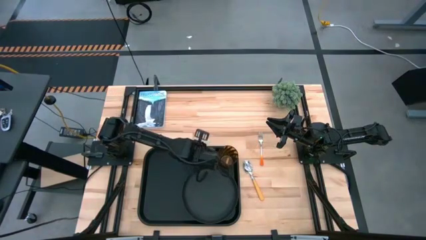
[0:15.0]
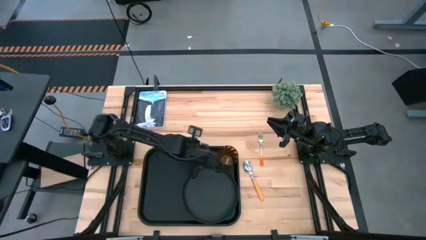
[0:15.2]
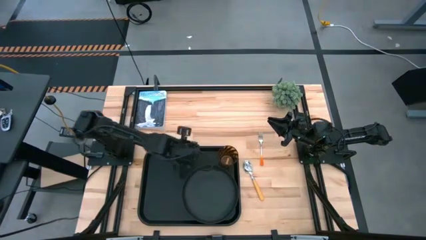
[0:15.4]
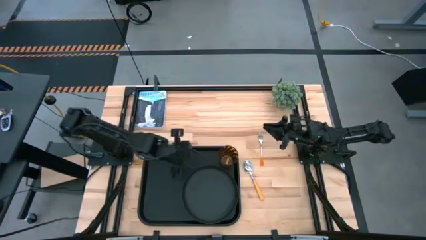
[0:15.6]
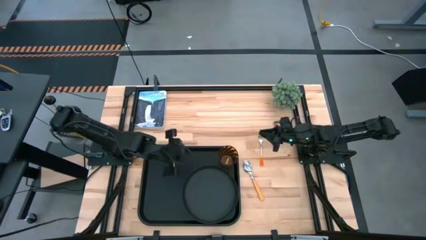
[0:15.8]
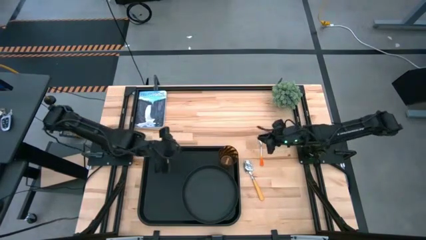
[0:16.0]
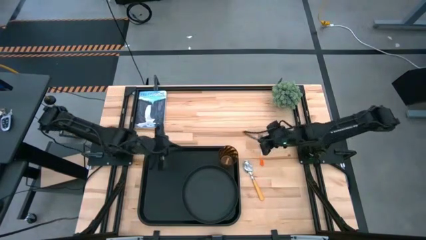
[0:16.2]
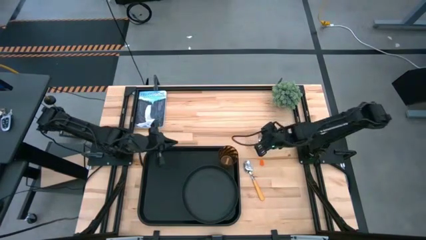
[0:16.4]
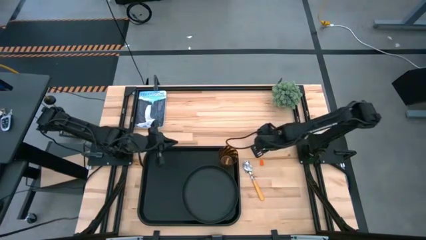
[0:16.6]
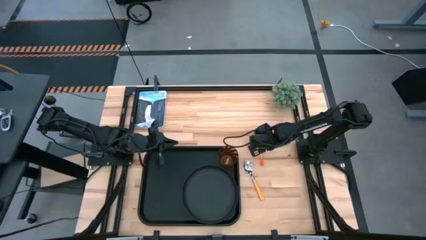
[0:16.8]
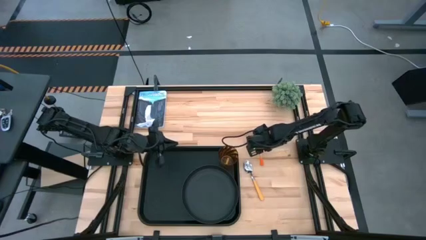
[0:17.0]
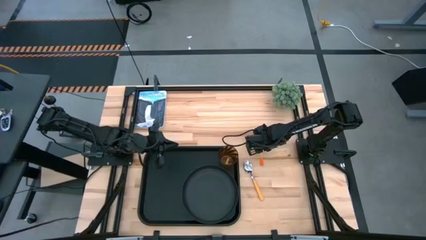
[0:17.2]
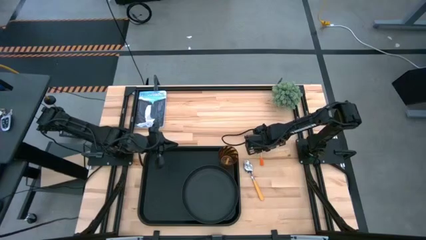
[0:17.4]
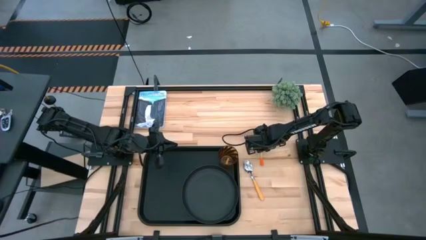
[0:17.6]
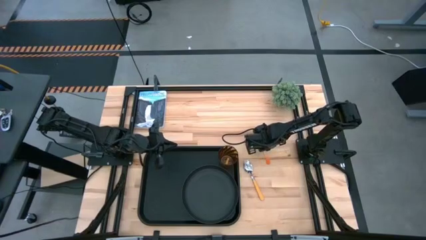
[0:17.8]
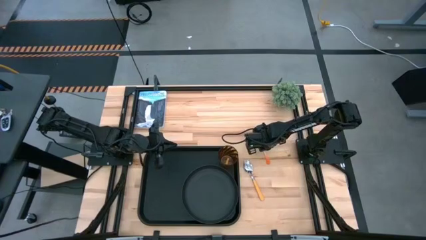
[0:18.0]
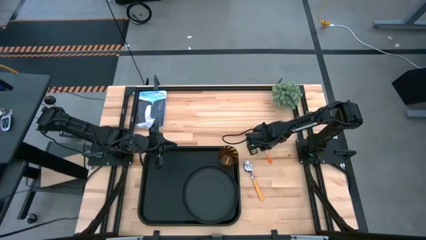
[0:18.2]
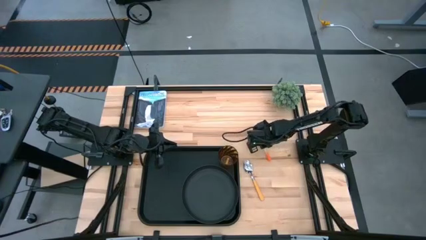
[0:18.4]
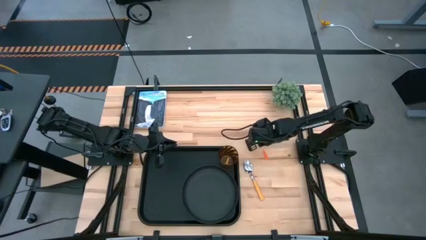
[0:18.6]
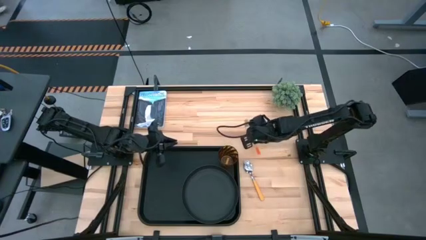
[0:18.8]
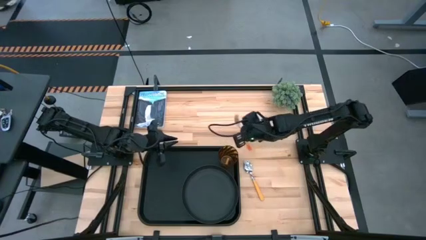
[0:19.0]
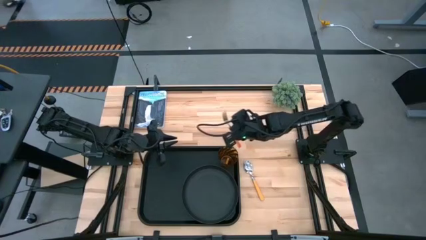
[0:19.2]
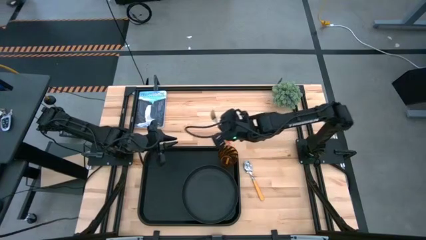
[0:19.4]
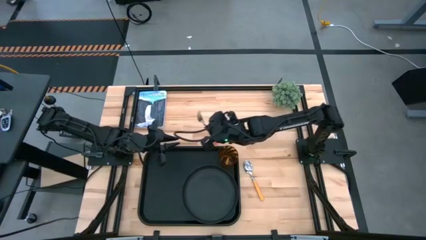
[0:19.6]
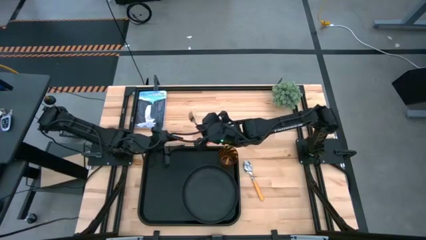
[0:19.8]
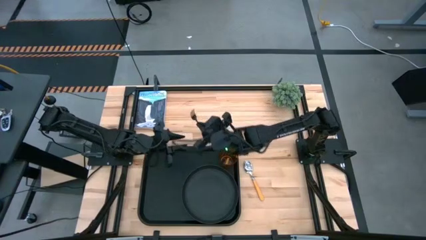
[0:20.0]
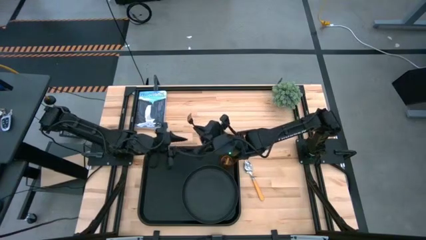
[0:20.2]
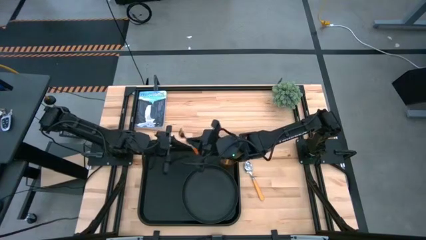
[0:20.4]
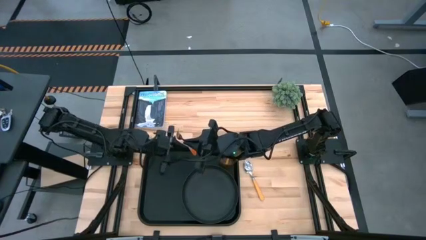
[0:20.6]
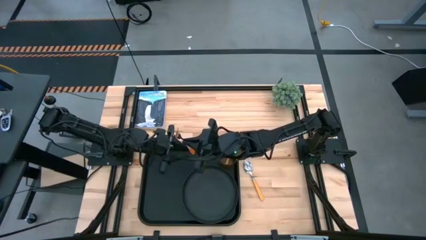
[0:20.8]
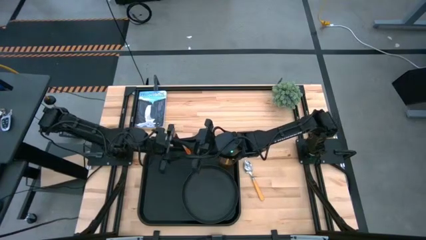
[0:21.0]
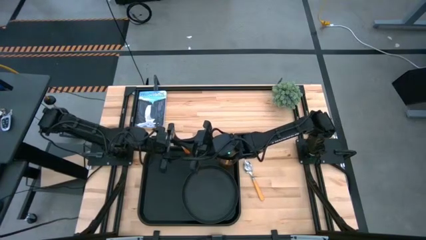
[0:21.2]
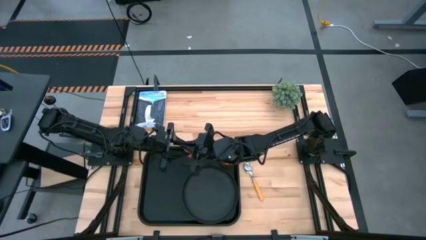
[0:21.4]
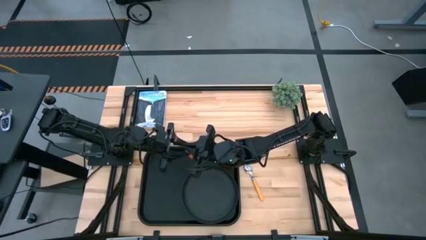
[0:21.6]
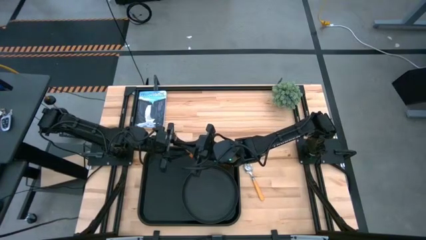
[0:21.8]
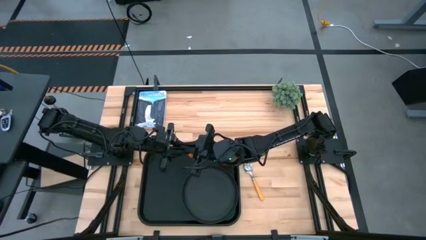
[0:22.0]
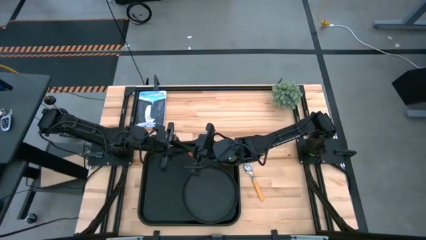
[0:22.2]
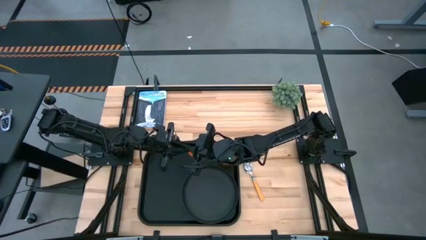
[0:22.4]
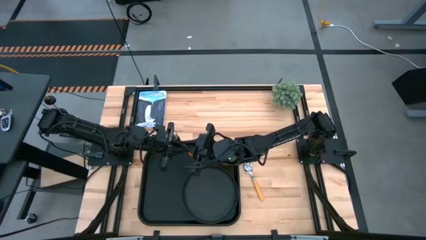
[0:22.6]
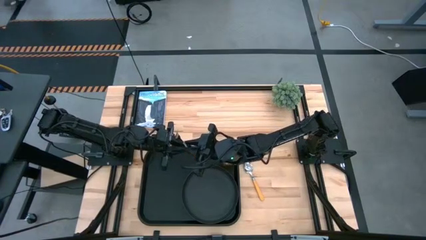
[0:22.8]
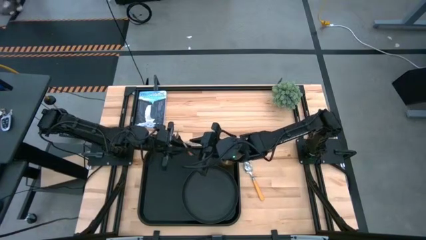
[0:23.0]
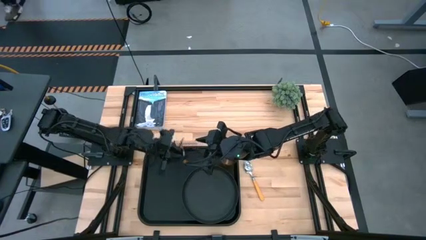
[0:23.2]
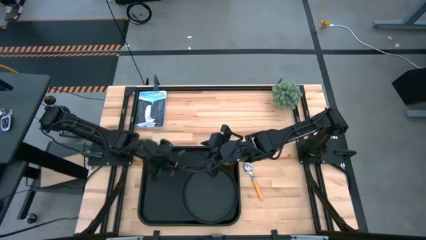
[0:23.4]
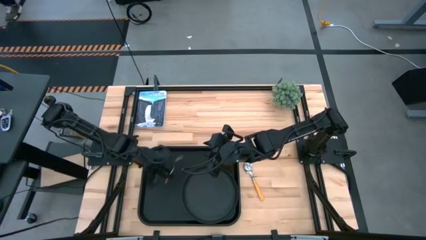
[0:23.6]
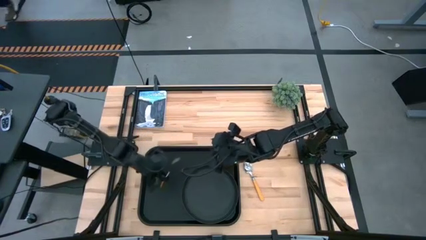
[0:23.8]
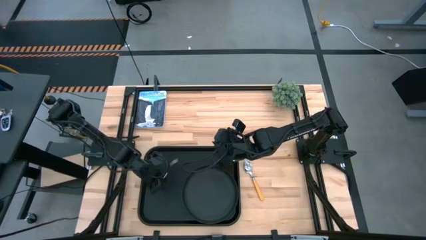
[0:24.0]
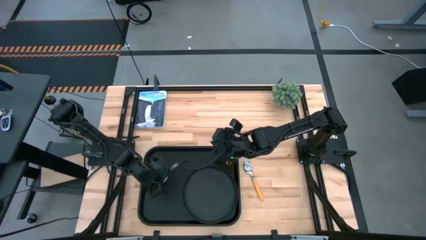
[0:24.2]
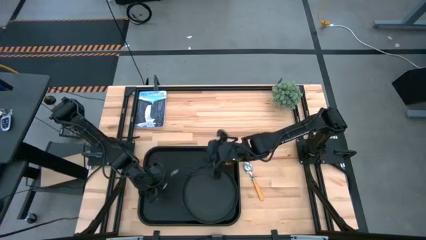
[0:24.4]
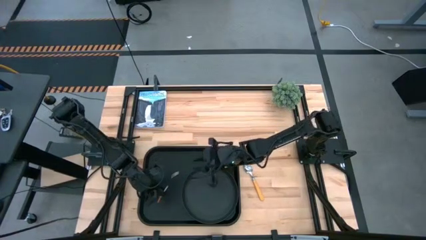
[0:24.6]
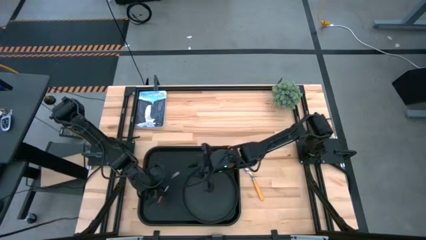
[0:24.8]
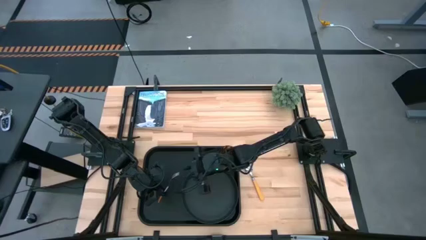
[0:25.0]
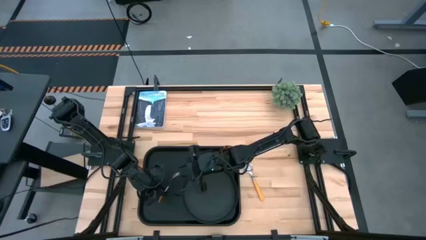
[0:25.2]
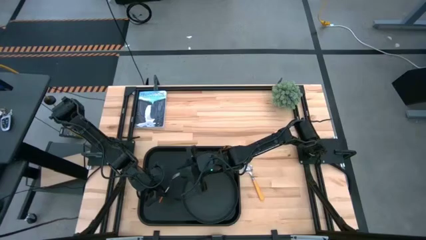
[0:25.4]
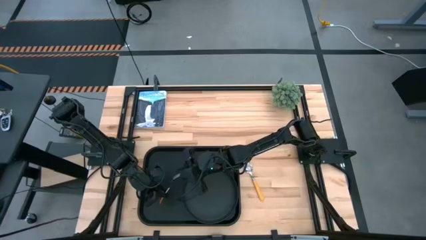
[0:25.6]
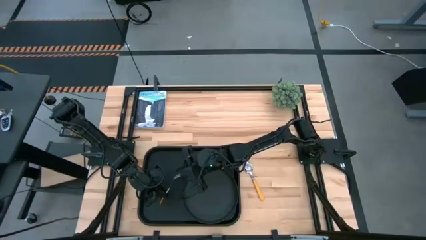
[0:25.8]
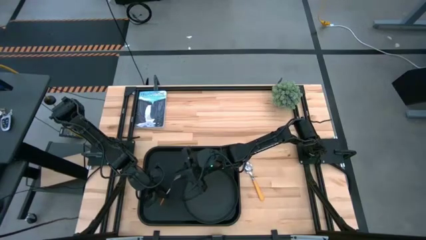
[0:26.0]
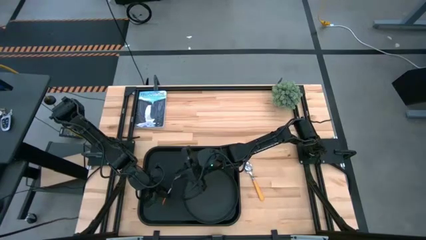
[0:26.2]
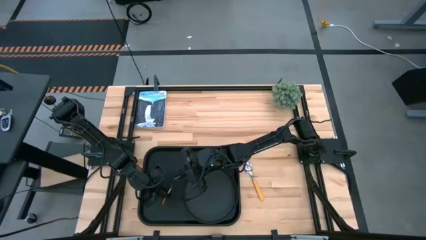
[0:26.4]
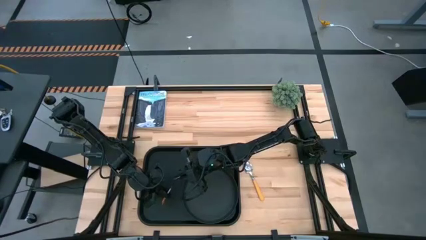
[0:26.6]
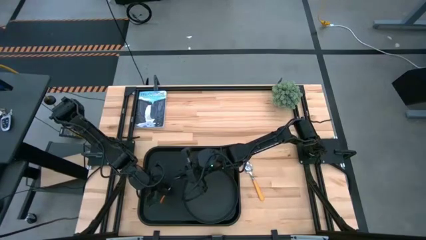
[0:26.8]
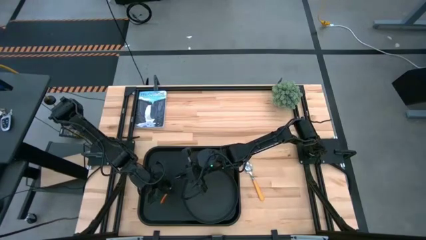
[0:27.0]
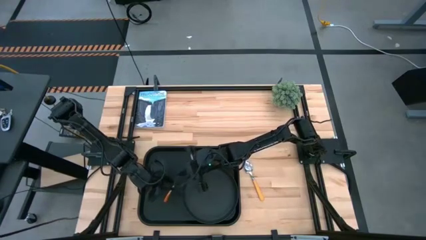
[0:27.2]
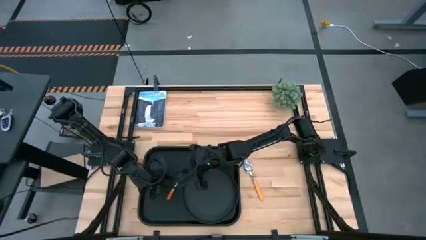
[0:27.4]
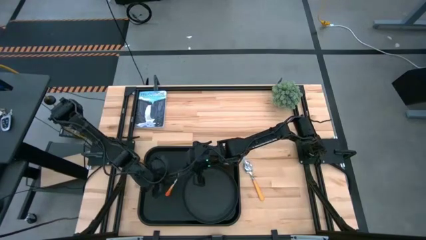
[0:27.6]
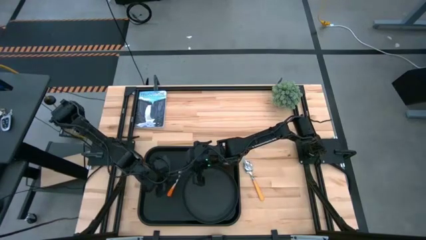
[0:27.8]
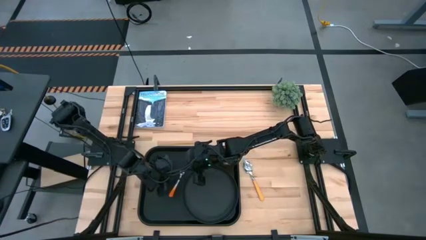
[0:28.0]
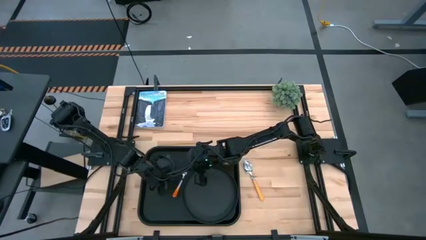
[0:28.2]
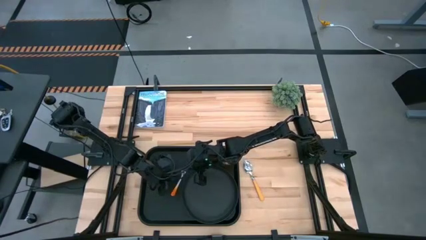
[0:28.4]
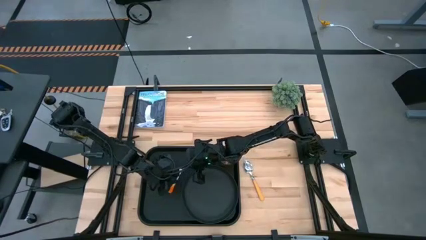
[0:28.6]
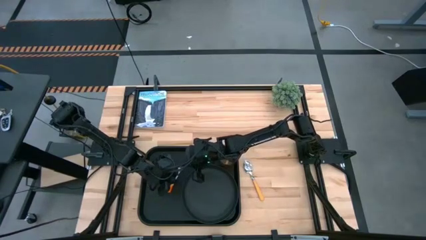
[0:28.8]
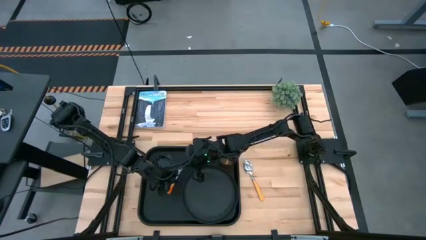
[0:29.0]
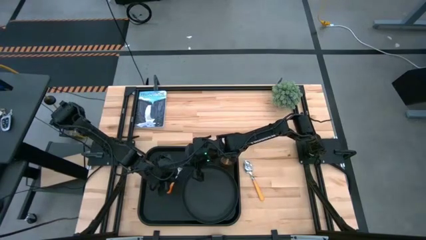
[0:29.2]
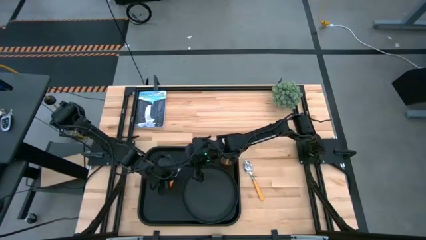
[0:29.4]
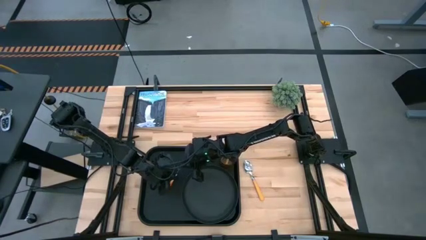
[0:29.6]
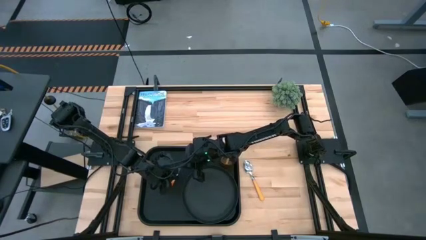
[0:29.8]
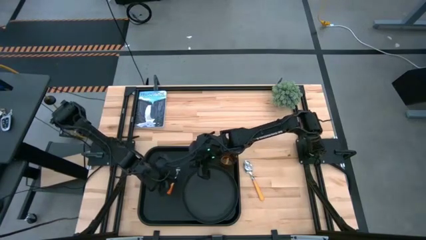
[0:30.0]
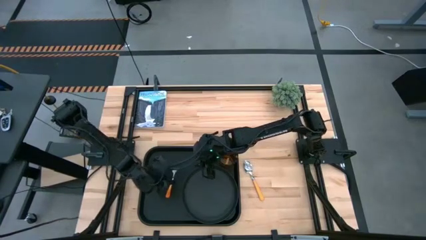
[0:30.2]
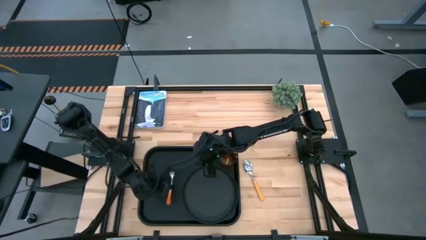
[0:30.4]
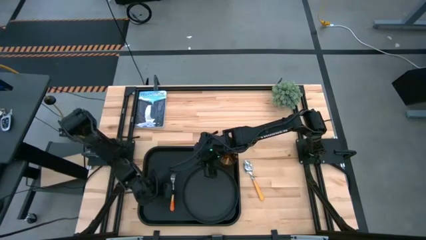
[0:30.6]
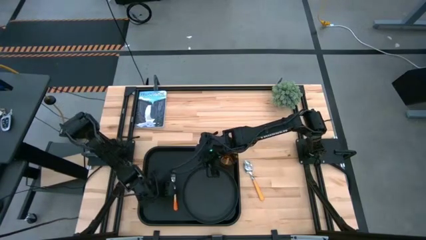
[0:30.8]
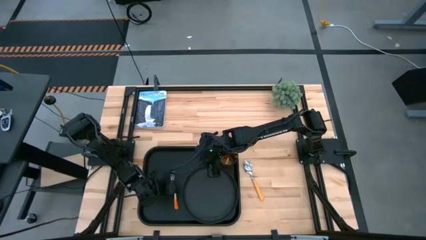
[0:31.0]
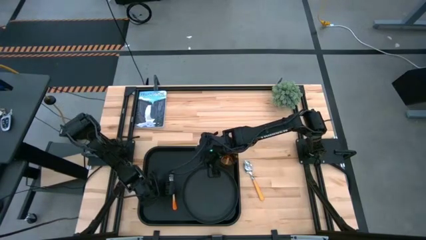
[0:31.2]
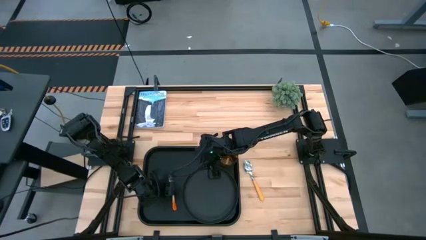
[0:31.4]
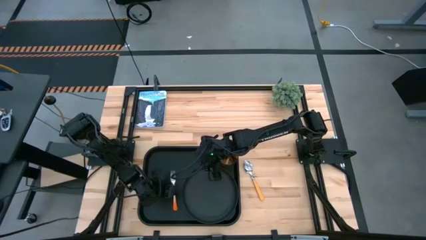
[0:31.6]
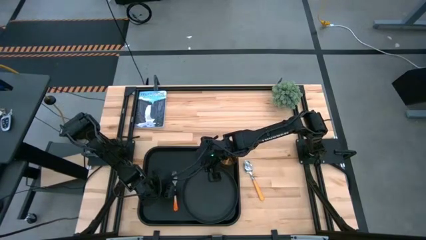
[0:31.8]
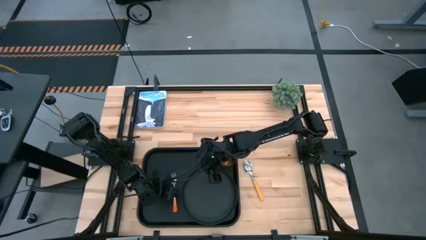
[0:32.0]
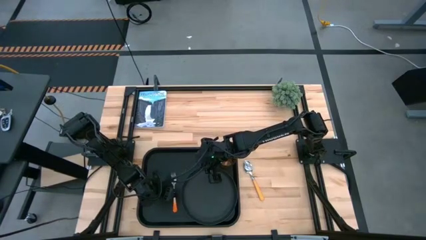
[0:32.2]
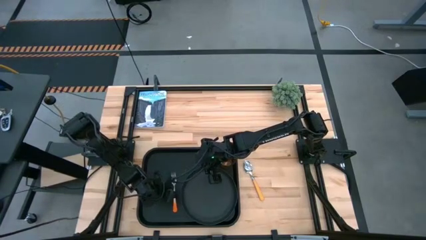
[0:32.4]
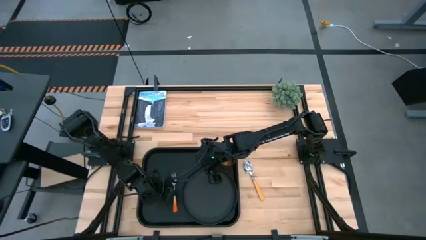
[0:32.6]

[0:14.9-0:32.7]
Task: Pick and place plate/cup/fork/spoon on tray
Put the orange fork on the black tray to the left of the black tray
